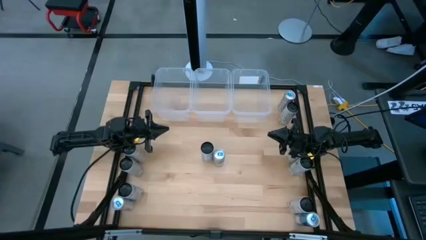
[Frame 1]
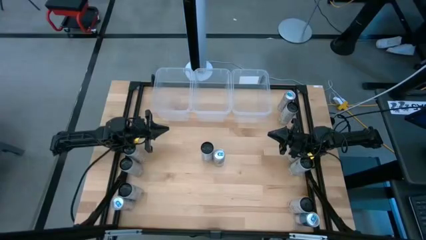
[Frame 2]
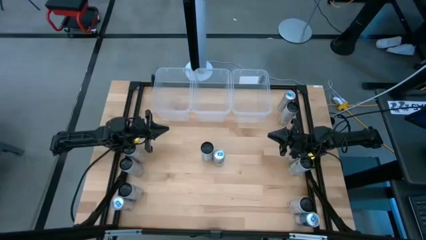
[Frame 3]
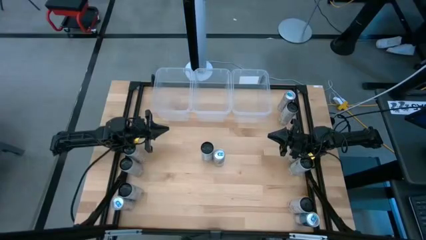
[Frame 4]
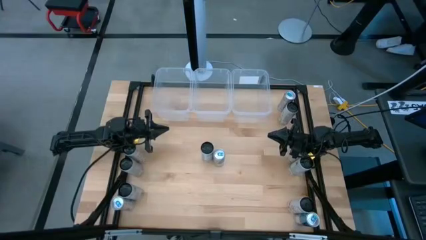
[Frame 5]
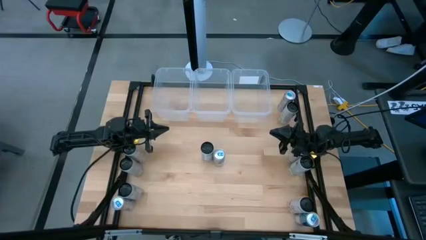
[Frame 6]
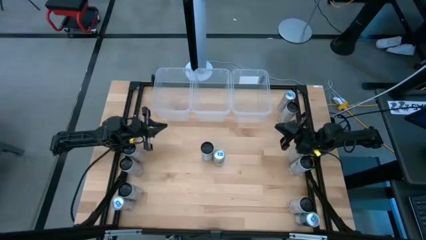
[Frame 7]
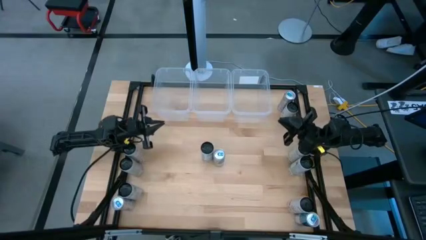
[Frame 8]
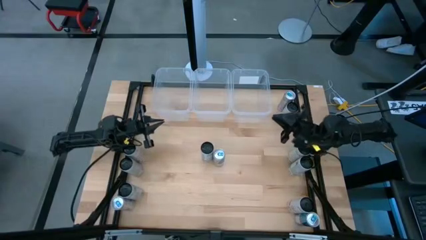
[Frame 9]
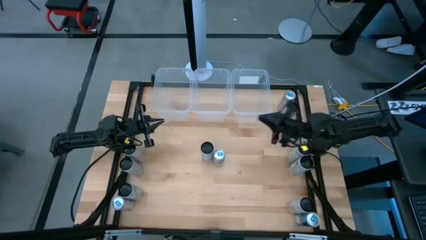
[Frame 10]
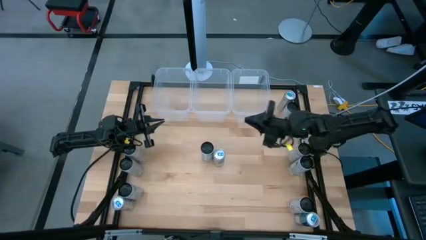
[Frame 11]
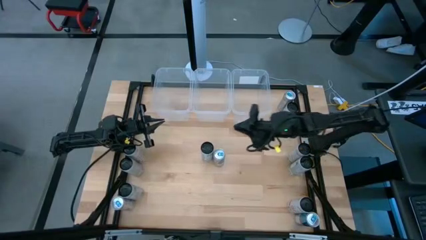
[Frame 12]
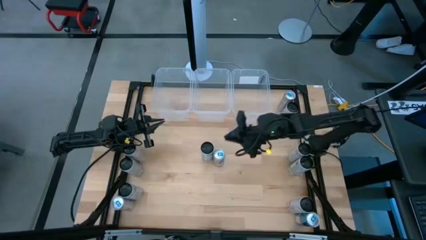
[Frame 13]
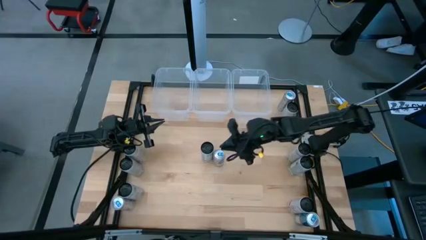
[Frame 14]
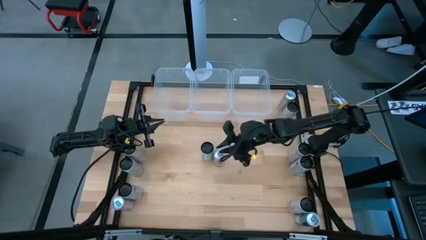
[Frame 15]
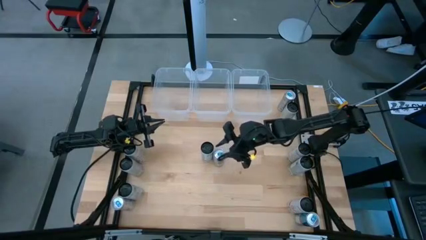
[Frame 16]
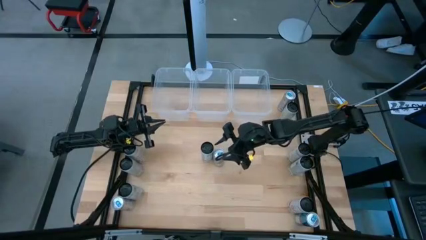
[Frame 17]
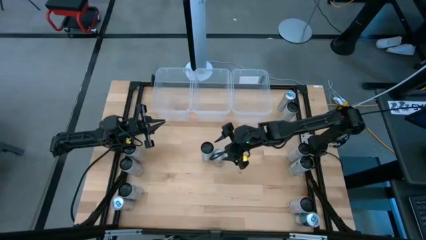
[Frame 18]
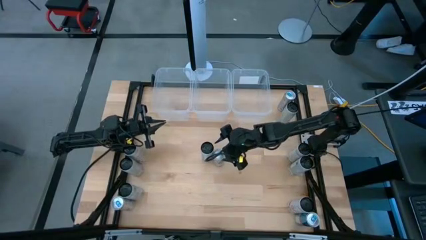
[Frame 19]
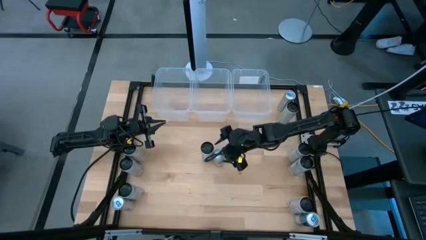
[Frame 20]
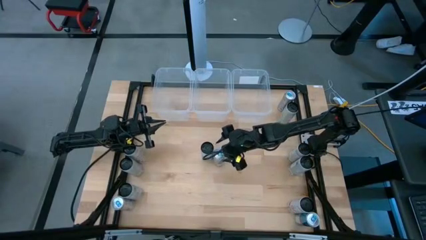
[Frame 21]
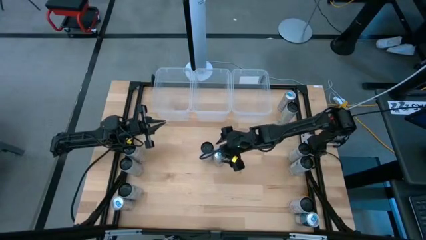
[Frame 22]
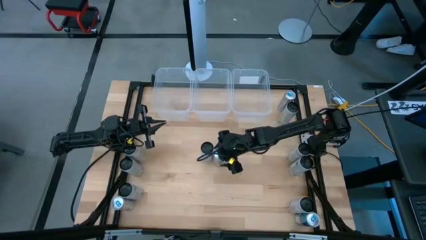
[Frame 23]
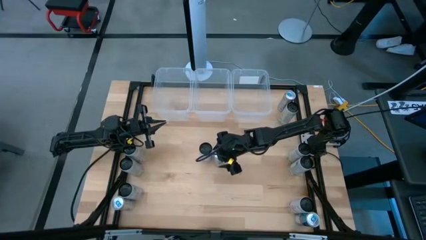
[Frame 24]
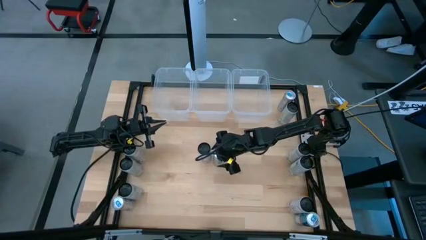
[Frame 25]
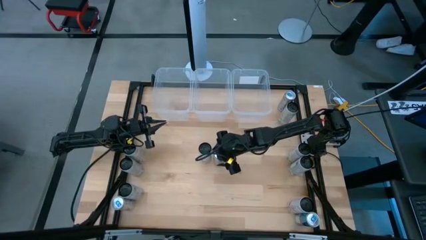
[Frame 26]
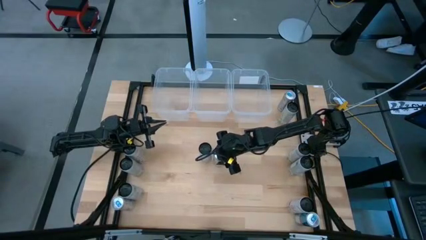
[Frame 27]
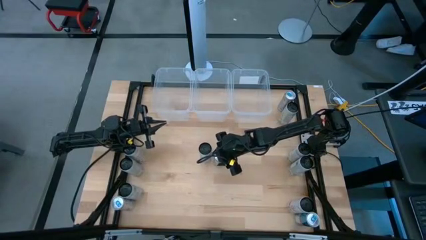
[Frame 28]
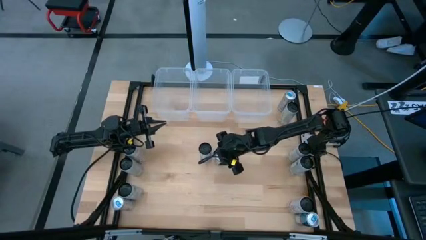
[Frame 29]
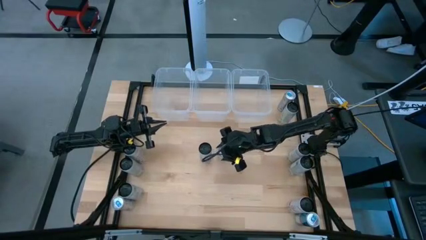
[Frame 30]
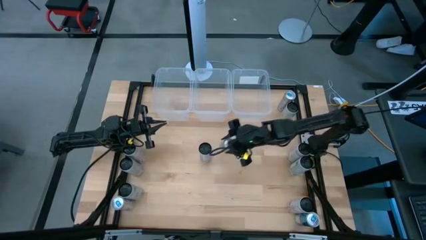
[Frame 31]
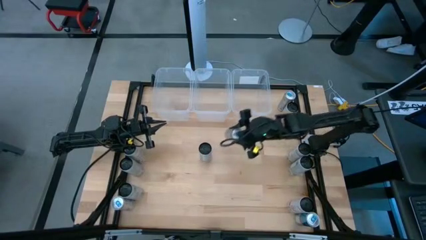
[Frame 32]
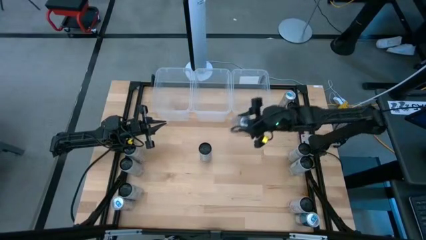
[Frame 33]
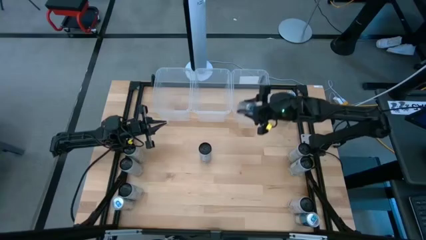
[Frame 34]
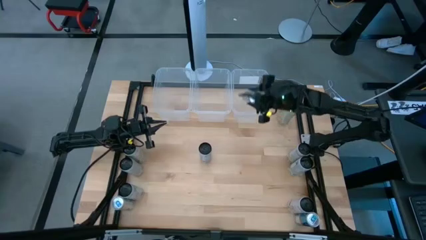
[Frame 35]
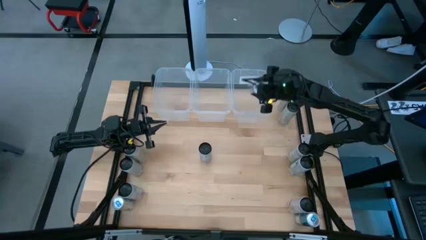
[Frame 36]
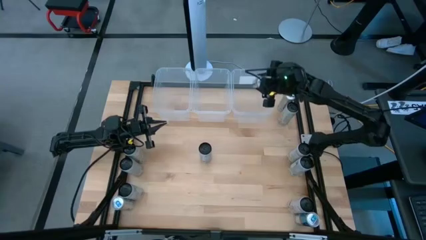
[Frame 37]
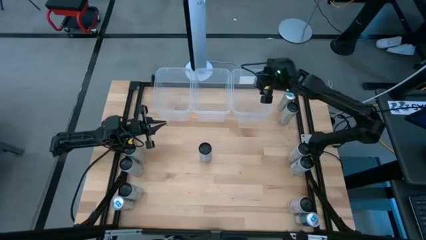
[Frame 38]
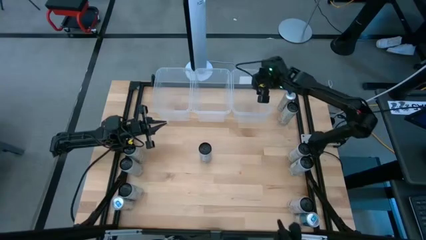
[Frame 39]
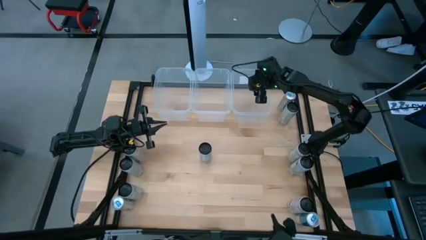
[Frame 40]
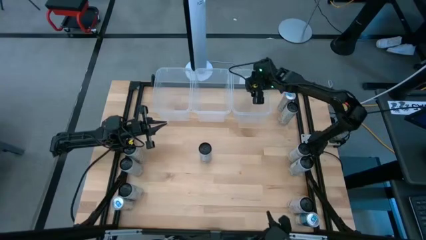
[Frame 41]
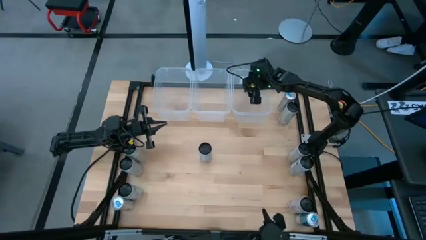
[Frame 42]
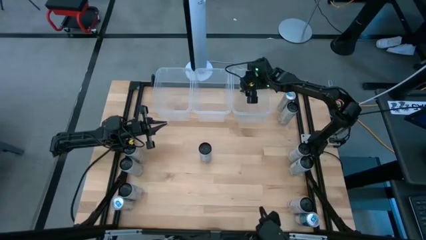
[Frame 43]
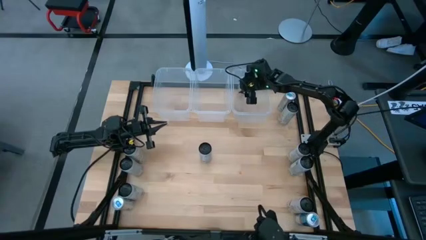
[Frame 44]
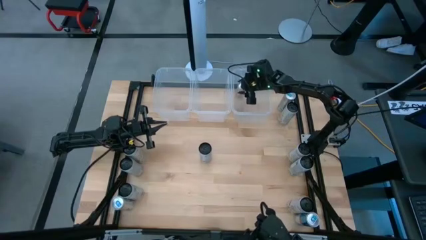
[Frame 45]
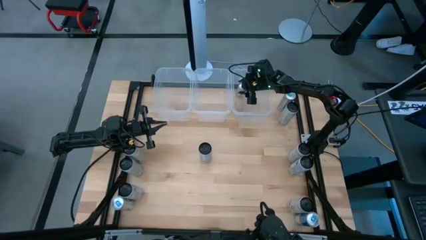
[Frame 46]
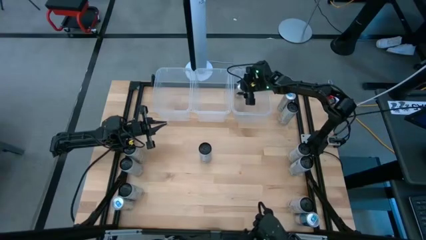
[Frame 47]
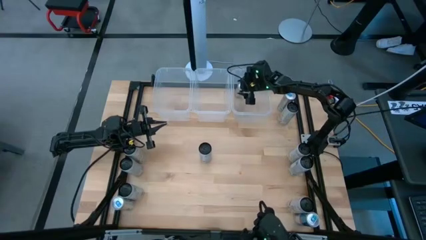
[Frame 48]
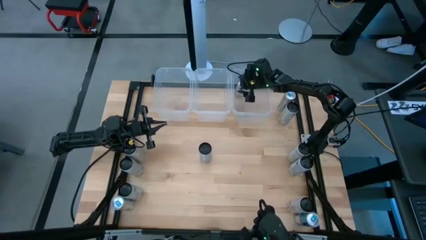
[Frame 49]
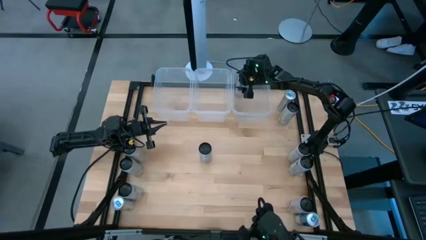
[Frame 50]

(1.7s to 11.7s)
Task: Sort soda cans
Put the blue soda can into the right transparent bin

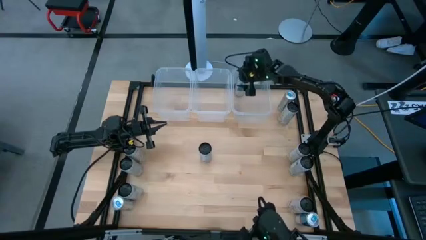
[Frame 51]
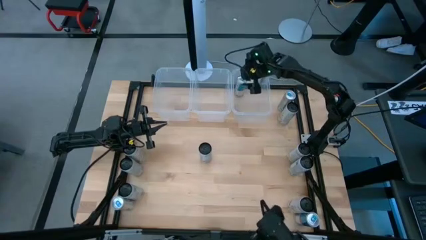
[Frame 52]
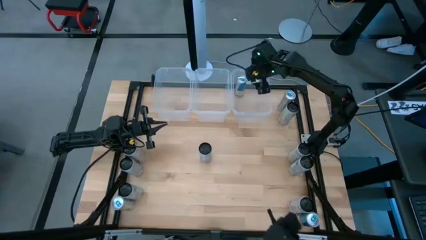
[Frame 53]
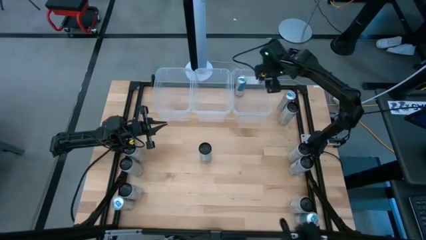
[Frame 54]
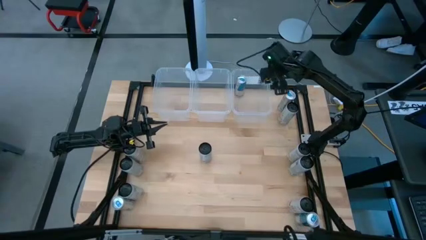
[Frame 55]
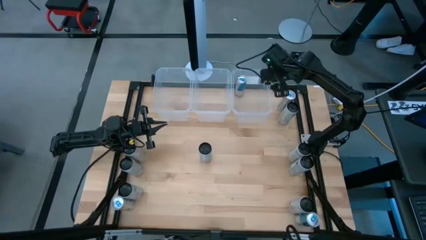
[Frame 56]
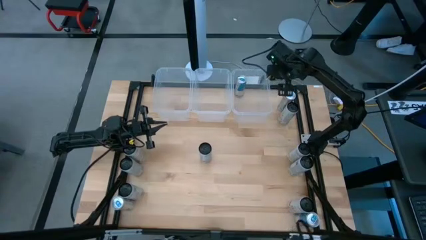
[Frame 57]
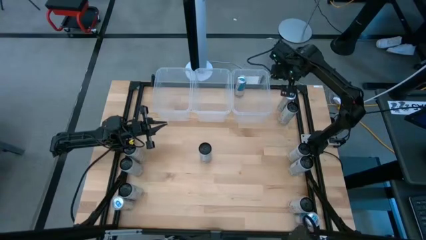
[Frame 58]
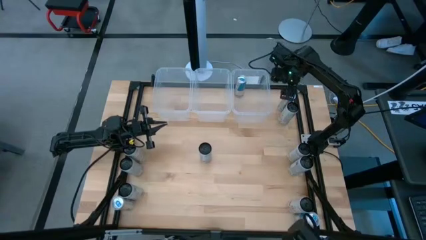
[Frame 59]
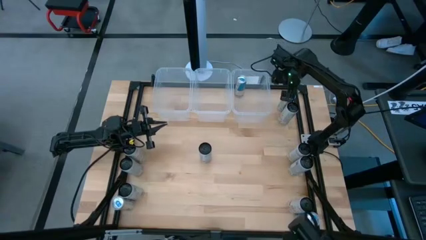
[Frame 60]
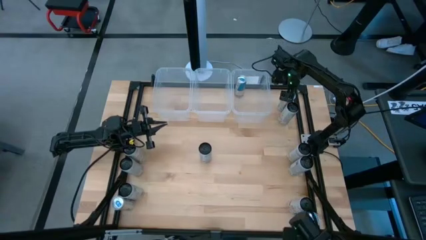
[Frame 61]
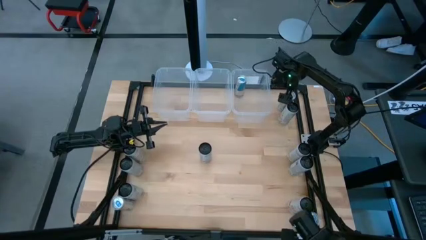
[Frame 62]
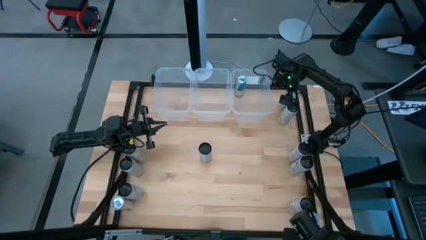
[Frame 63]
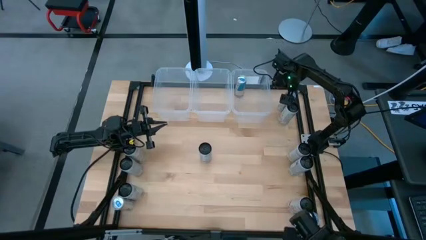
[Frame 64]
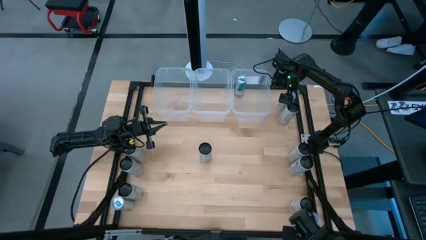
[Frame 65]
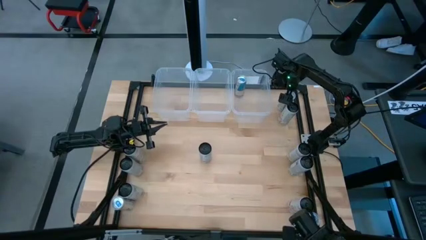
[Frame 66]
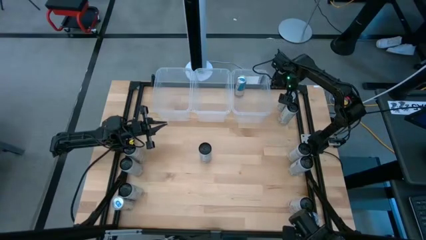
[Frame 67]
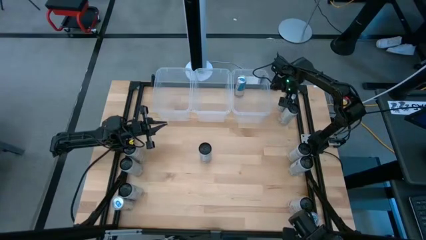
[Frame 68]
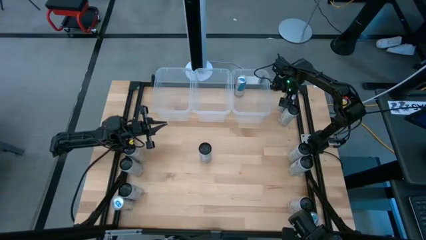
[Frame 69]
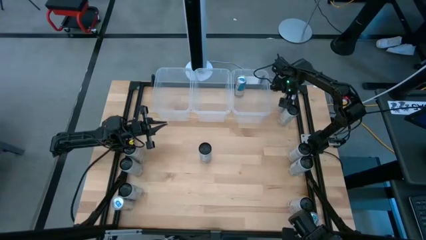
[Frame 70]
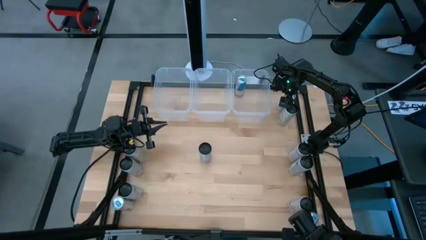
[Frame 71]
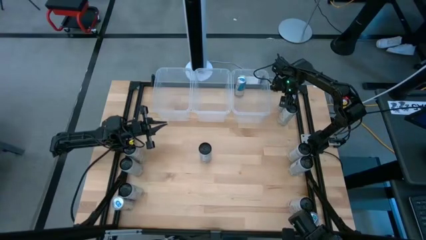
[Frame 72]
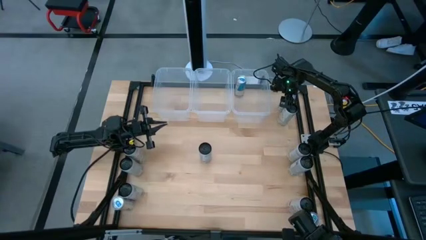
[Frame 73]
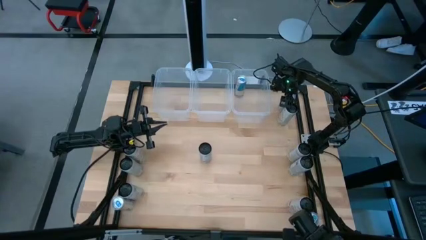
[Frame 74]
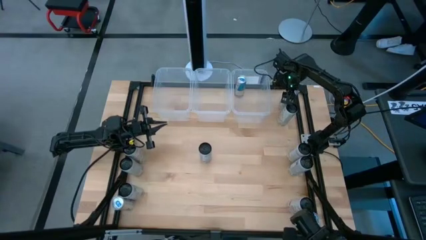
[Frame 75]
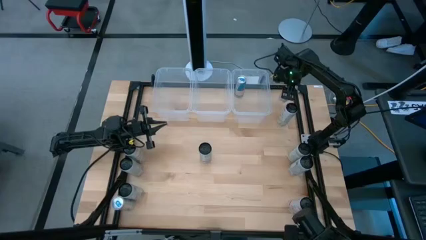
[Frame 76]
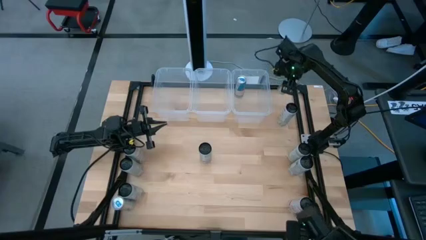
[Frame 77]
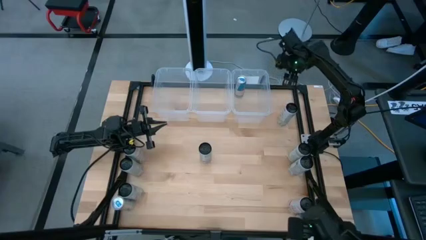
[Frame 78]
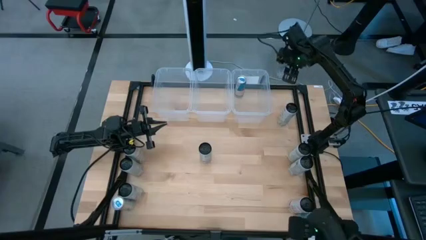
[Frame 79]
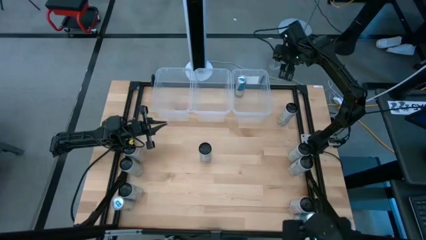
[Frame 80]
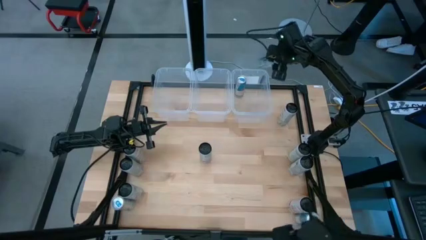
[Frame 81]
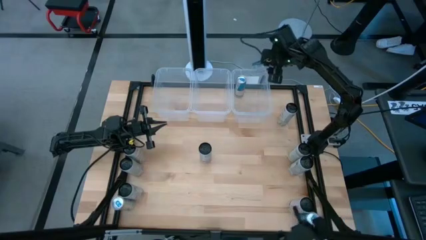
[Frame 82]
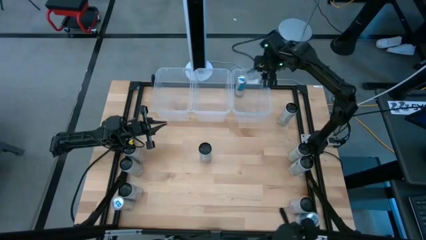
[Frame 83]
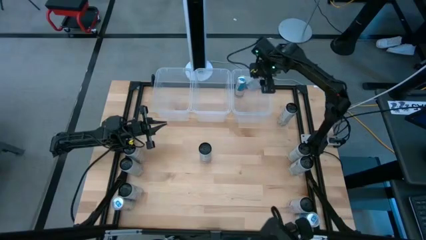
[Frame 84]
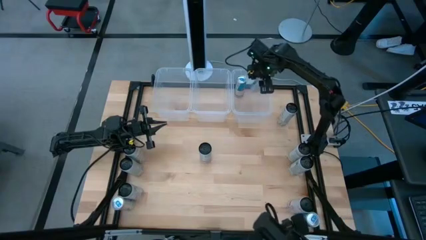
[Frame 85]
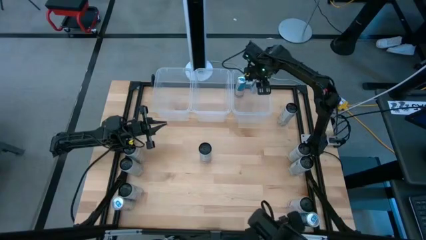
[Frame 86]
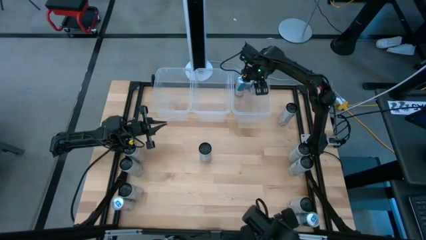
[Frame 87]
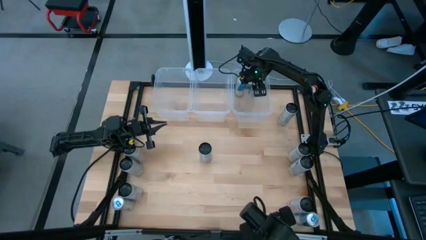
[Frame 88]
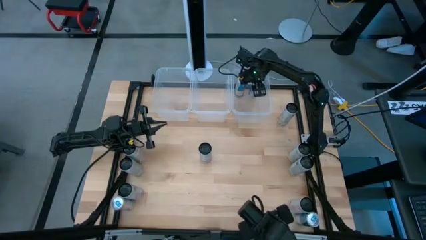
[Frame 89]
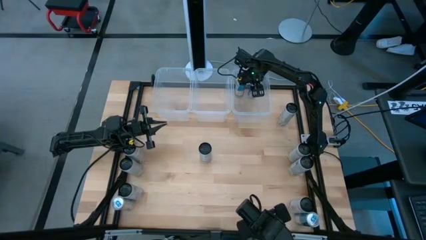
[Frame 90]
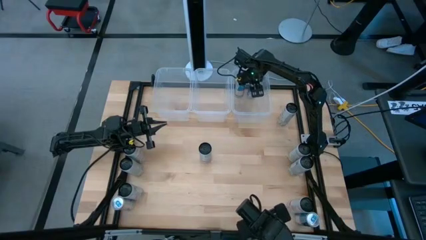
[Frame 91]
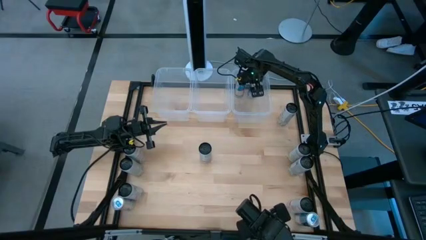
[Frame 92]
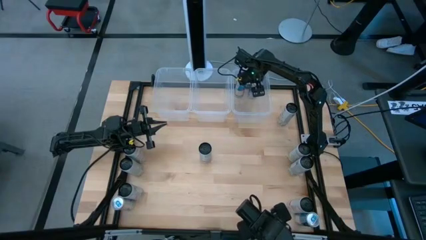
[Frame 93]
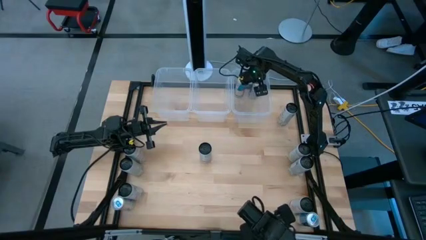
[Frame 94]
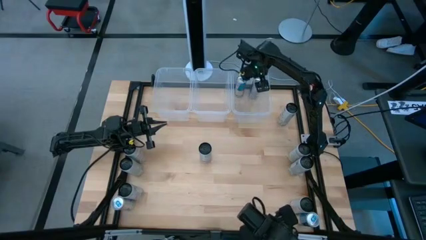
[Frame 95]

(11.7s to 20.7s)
Put the blue soda can into the right transparent bin
